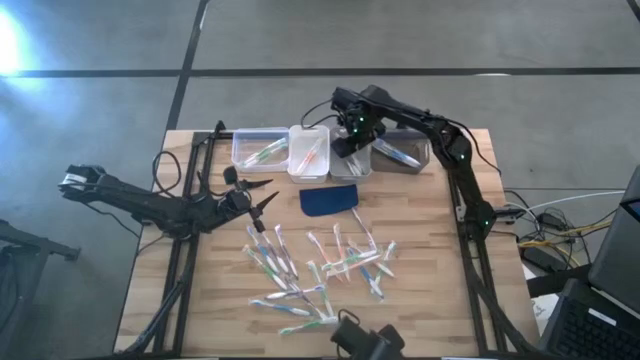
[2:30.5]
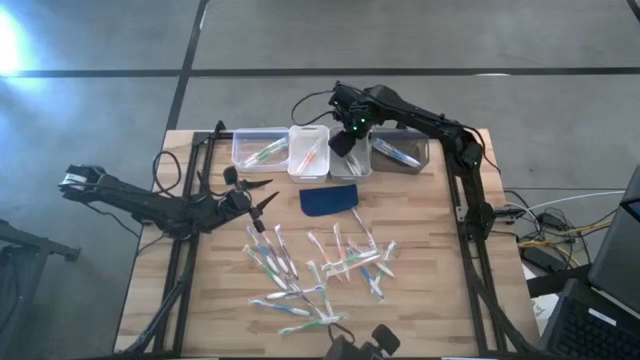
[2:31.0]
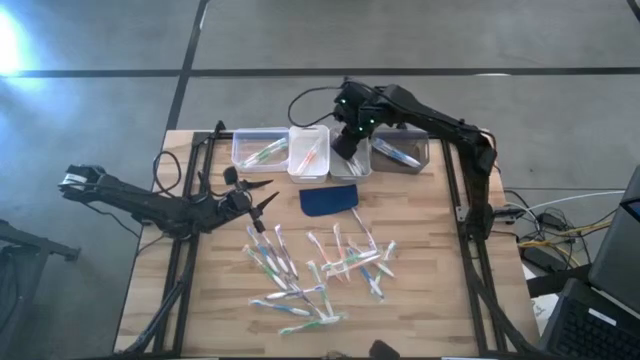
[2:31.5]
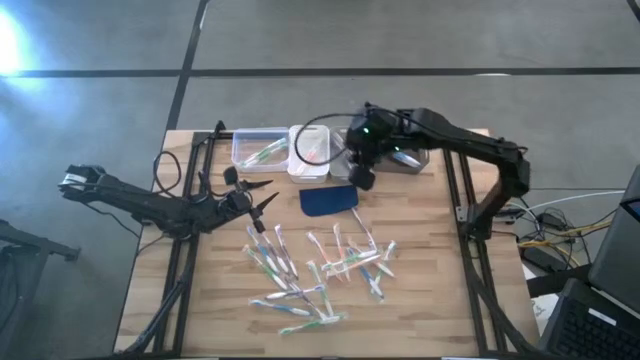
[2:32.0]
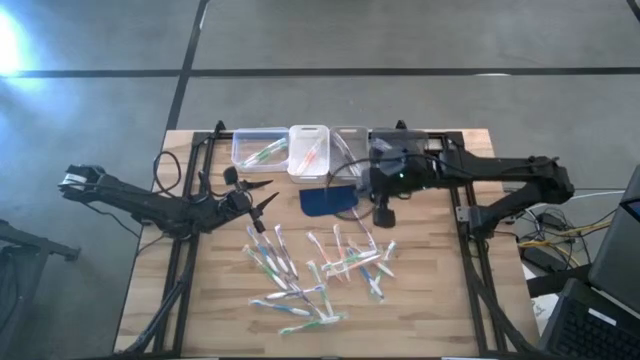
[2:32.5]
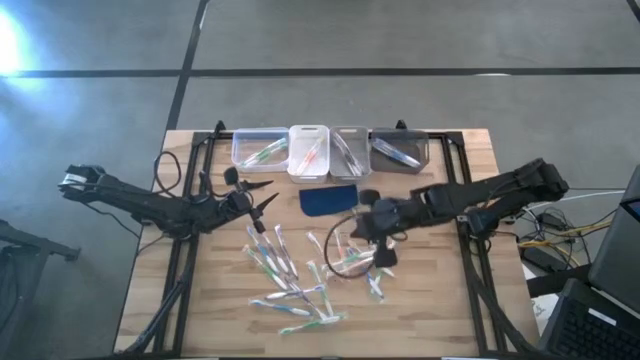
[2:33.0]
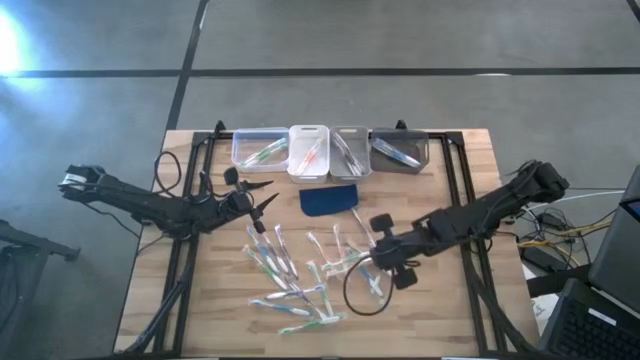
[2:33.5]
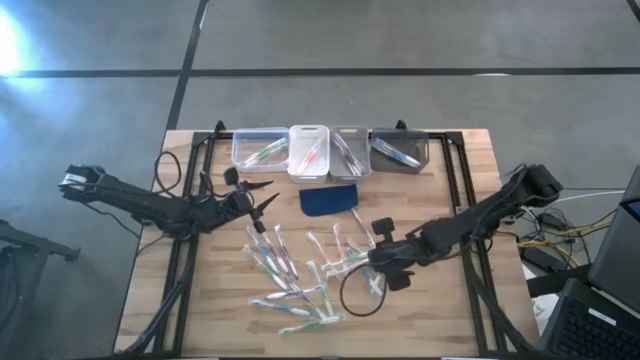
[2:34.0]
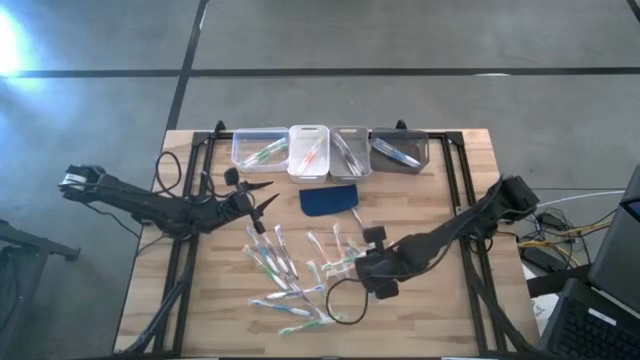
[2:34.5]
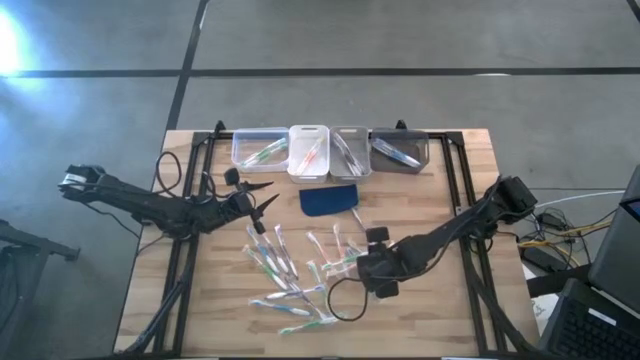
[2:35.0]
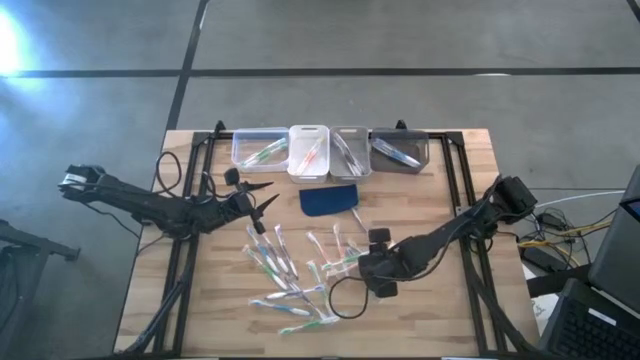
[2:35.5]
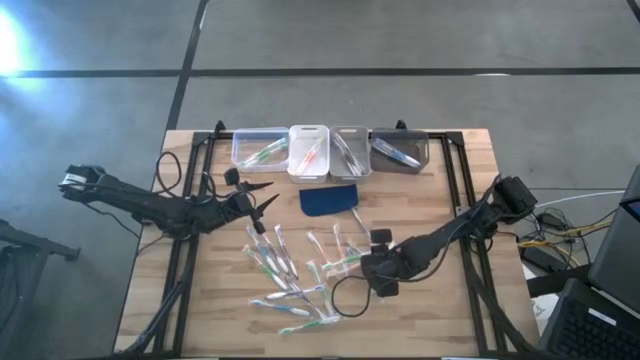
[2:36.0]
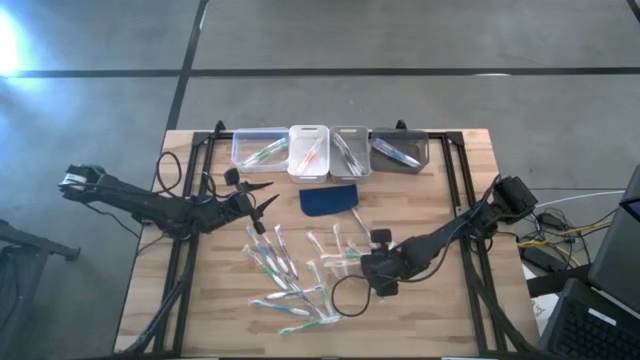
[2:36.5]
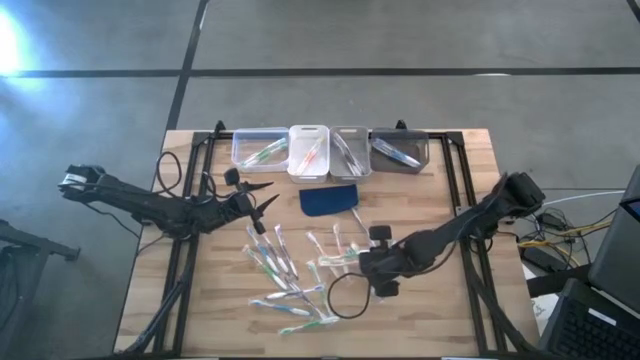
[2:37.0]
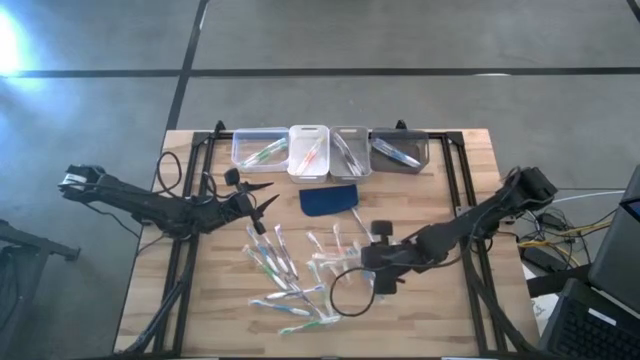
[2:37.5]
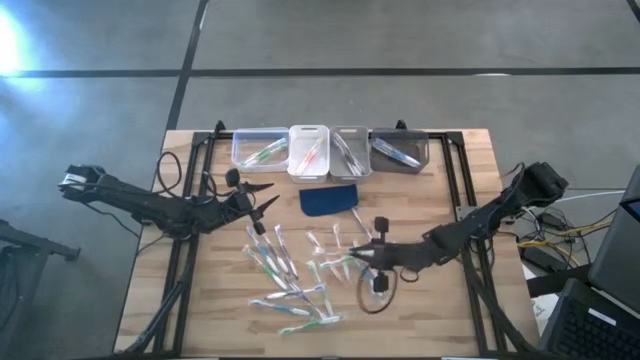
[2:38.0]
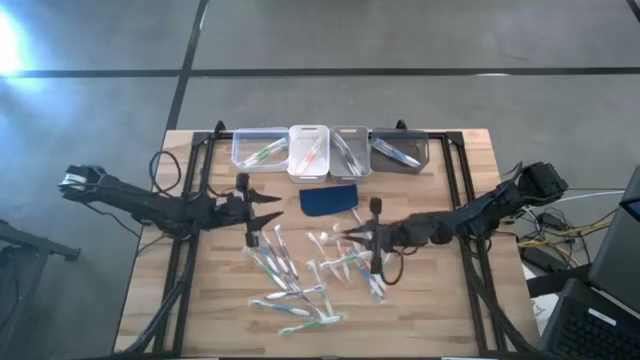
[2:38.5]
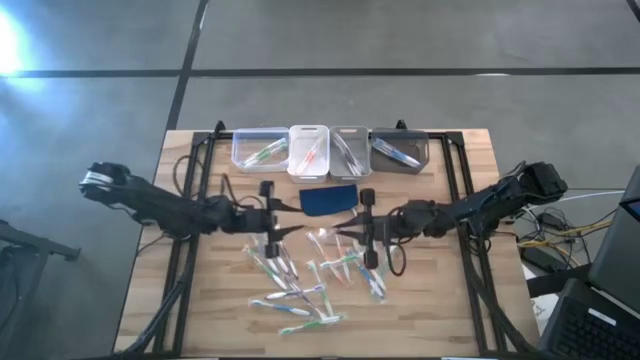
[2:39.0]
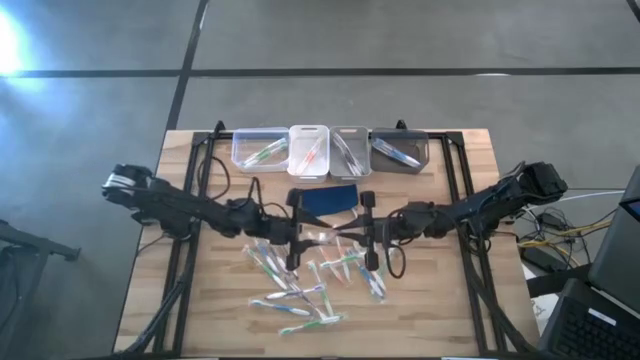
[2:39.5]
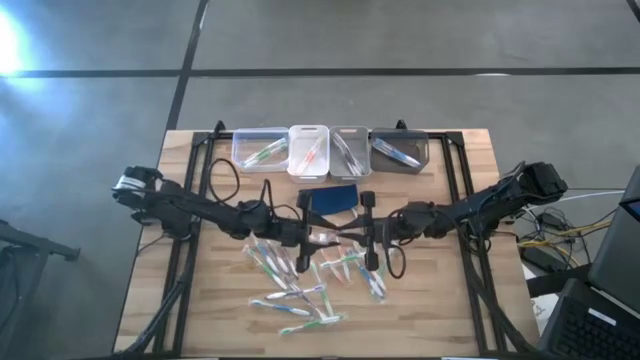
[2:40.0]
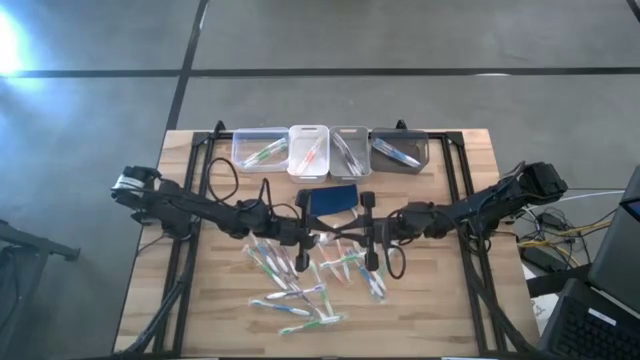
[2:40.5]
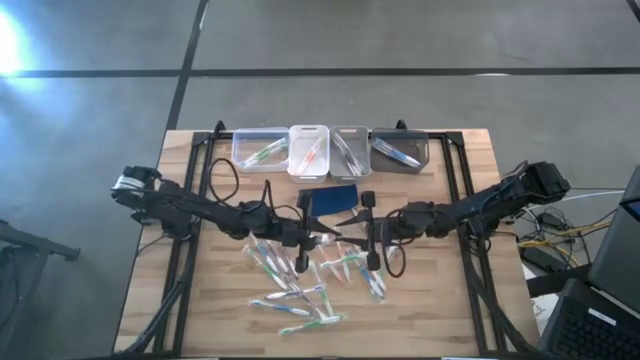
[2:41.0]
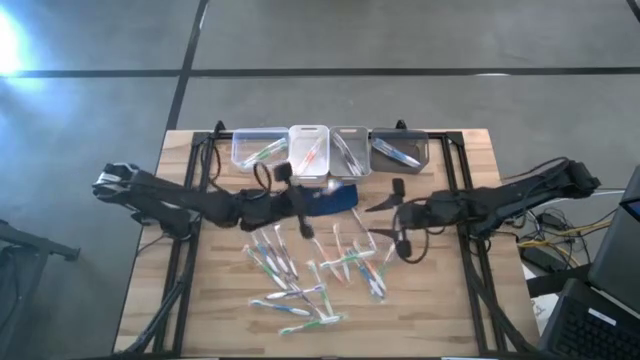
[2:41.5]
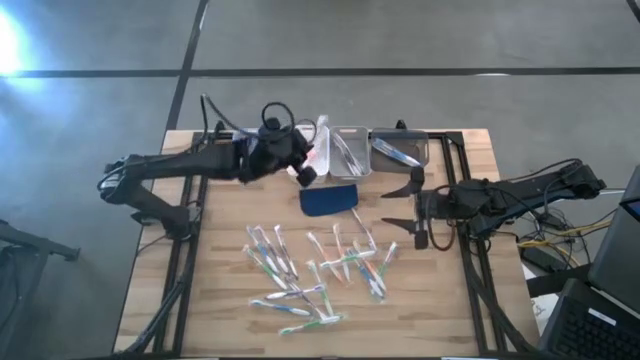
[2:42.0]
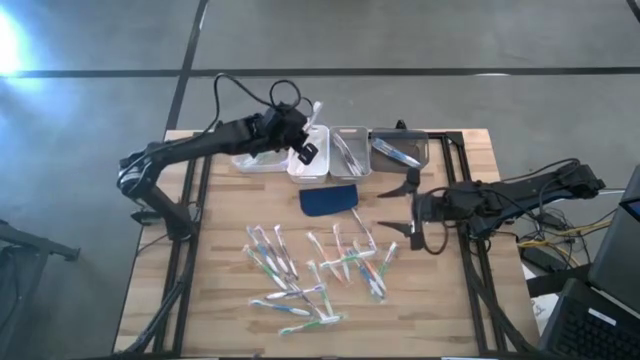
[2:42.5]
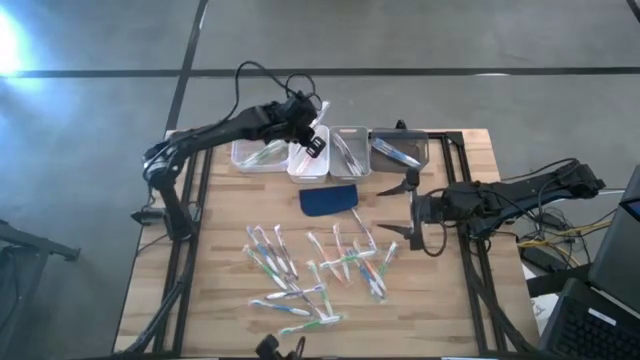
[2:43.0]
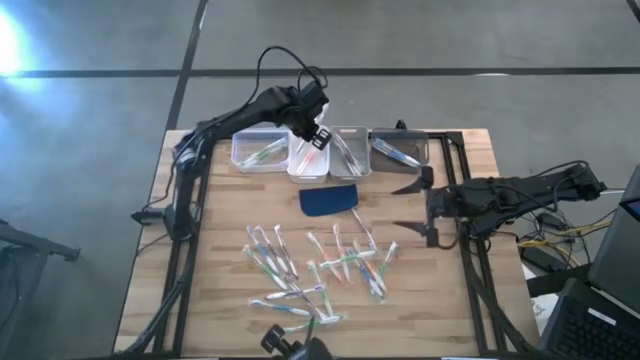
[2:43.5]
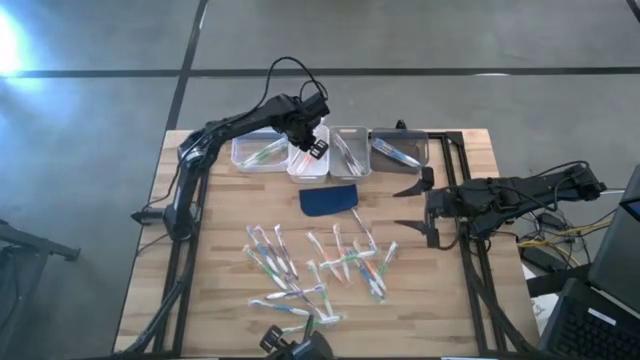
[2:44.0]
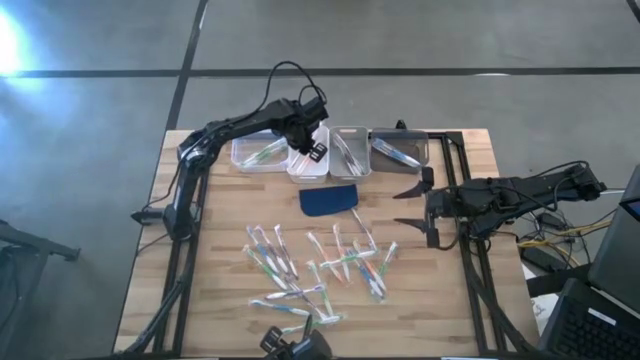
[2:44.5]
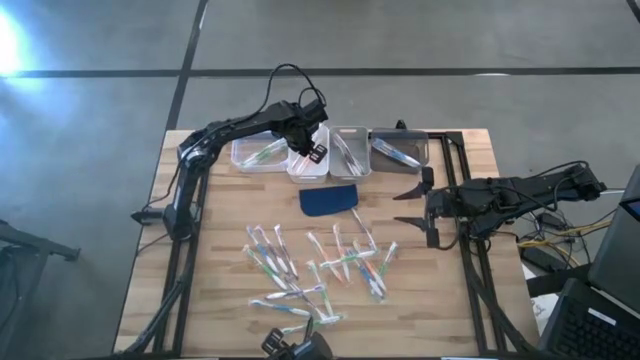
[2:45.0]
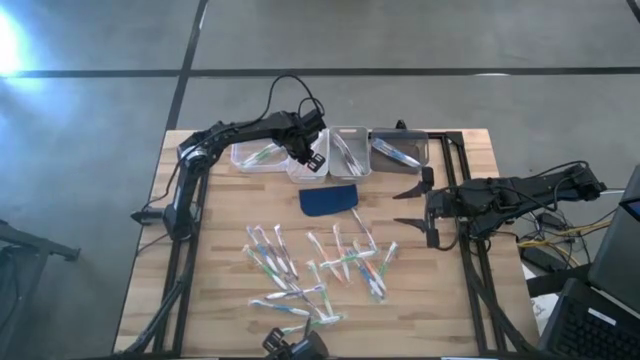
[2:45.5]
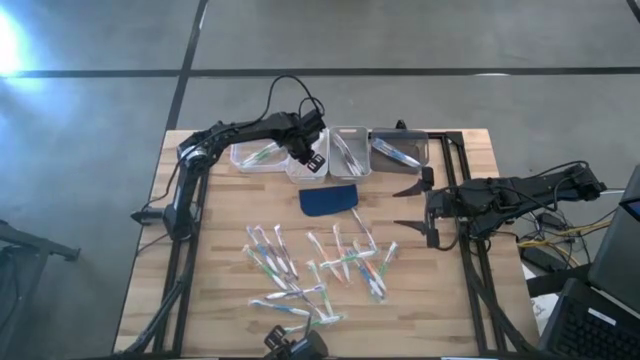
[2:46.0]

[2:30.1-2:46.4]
Task: Pick & Place Toothbrushes
Put the orange toothbrush into the white bin

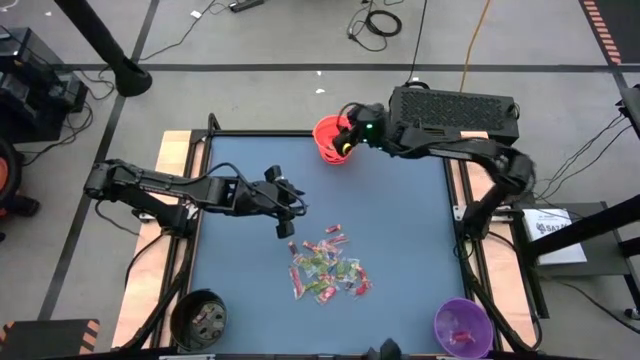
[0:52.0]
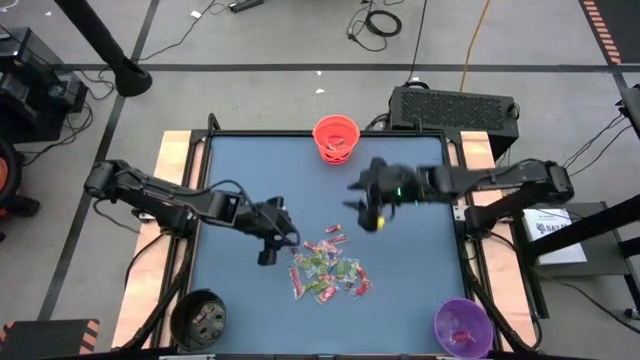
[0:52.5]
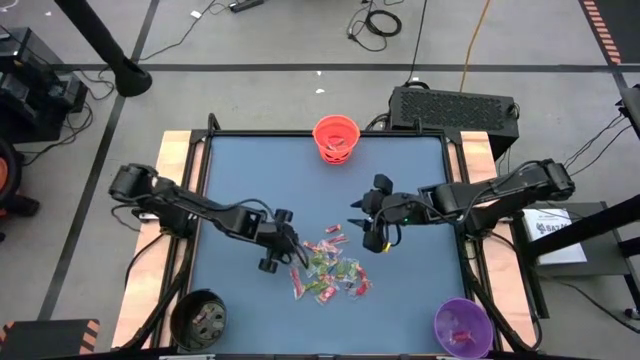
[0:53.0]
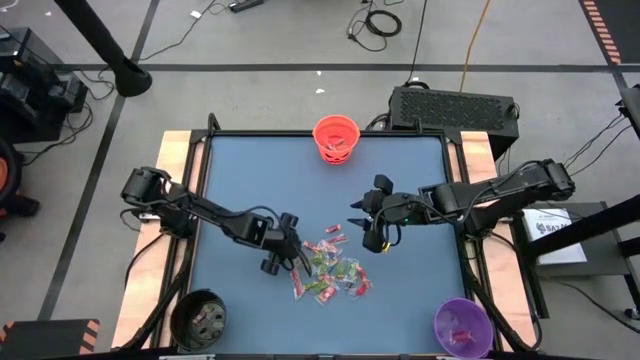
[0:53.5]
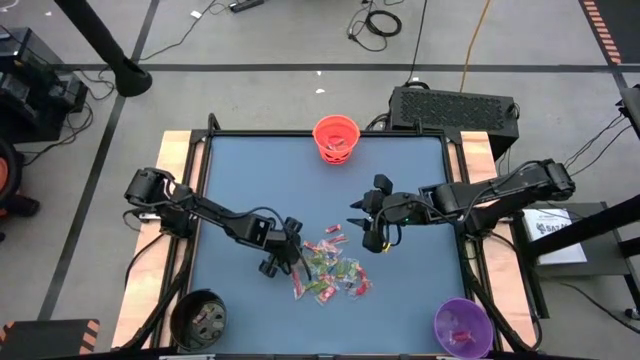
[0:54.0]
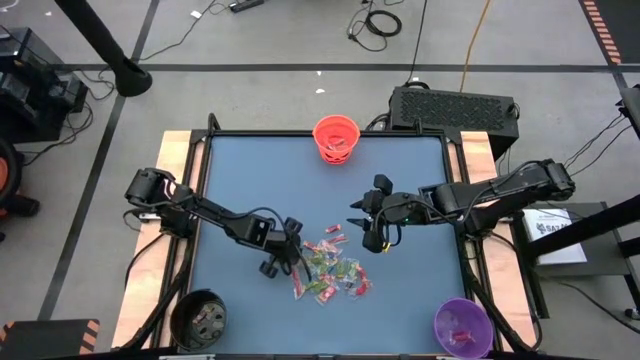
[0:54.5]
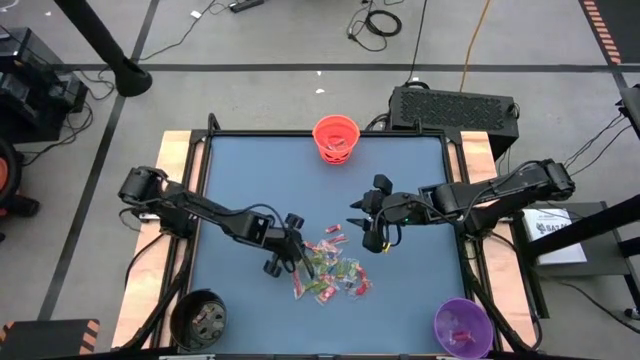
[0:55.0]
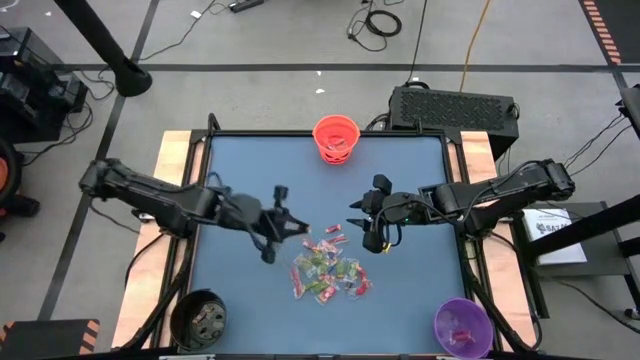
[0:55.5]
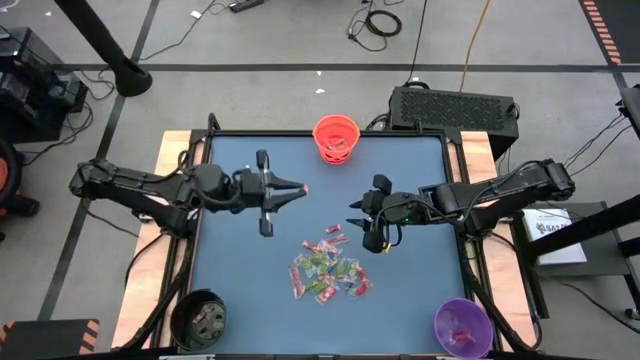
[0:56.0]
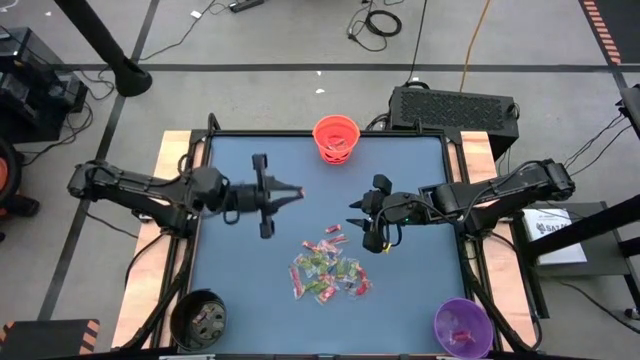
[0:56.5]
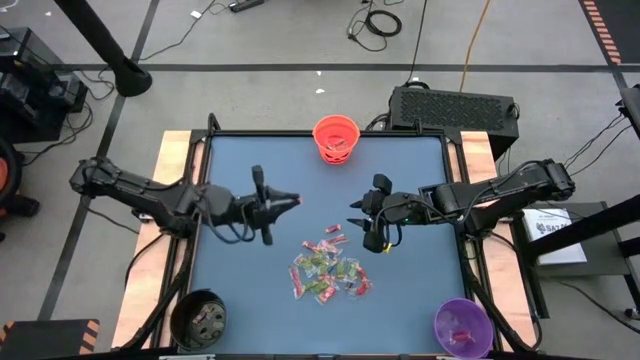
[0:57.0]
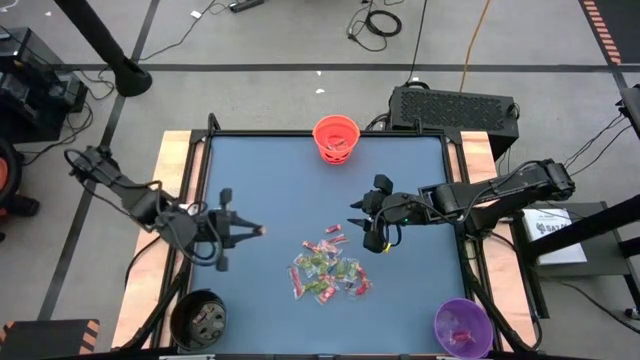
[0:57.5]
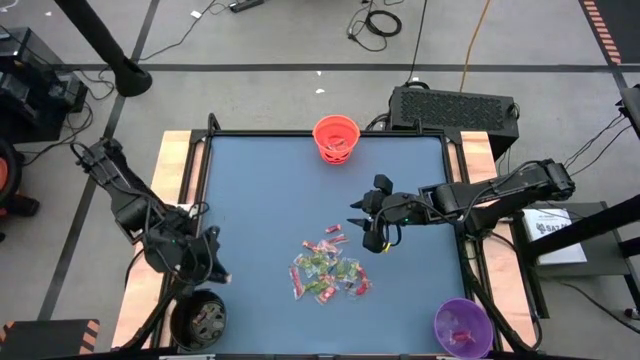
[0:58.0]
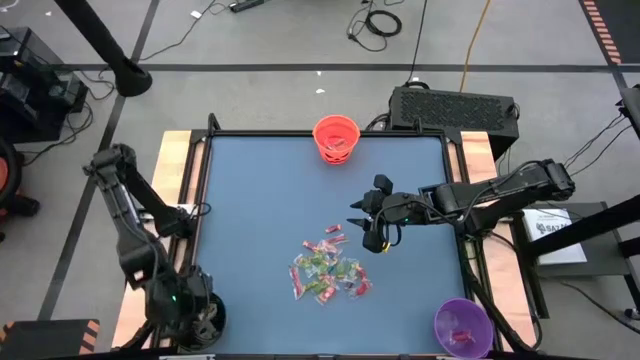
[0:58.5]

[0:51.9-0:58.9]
Task: Sort candy by brand, put in halloween buckets
Put the red candy into the black bucket
